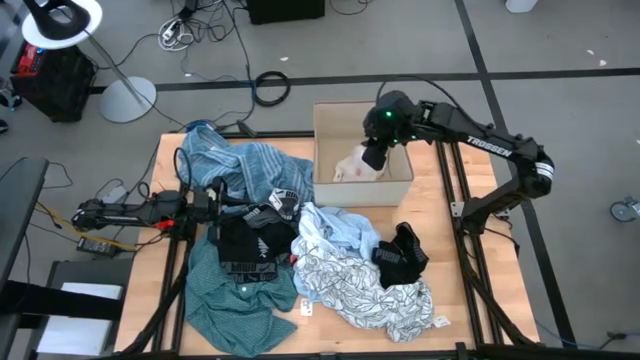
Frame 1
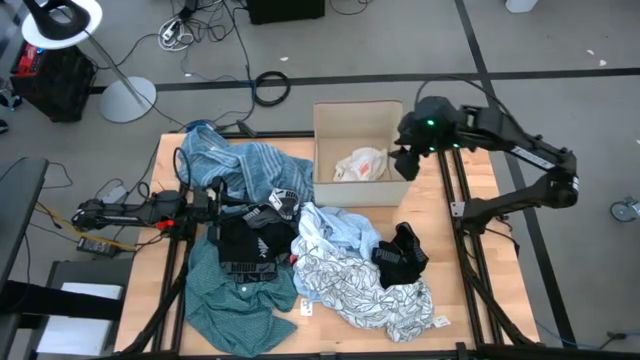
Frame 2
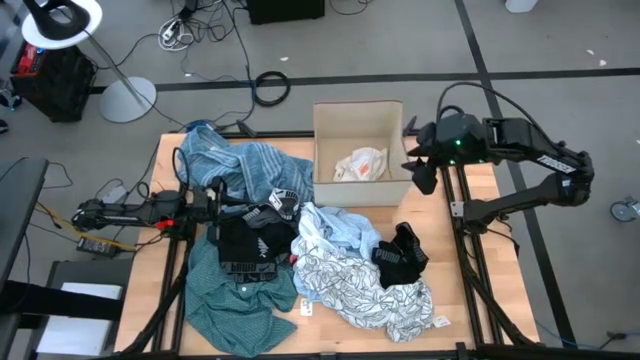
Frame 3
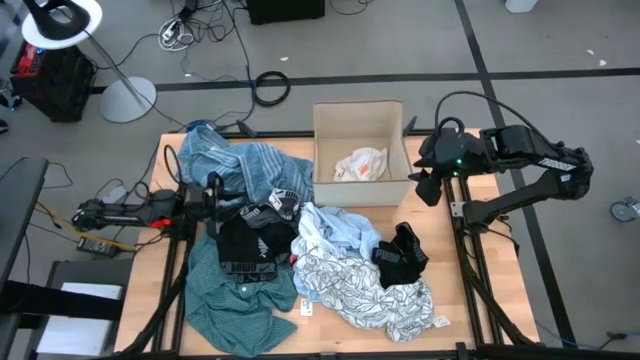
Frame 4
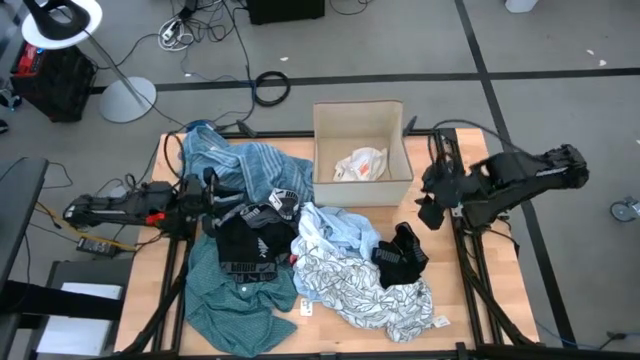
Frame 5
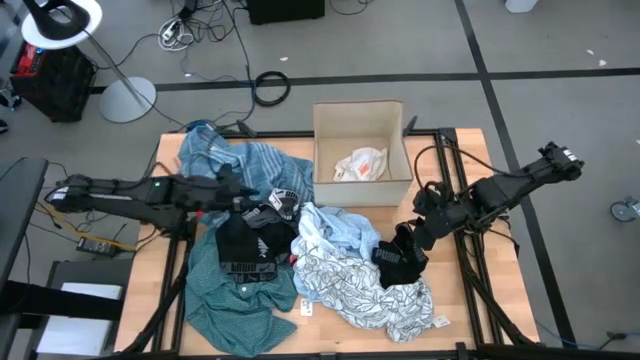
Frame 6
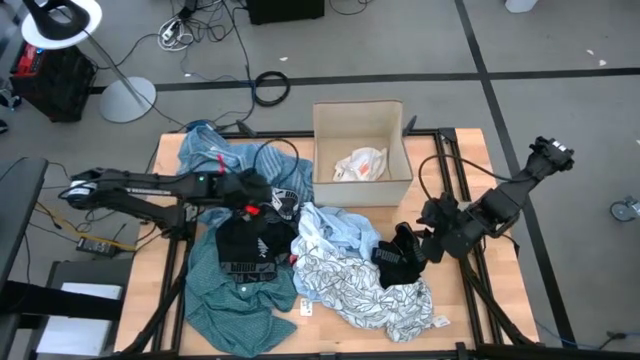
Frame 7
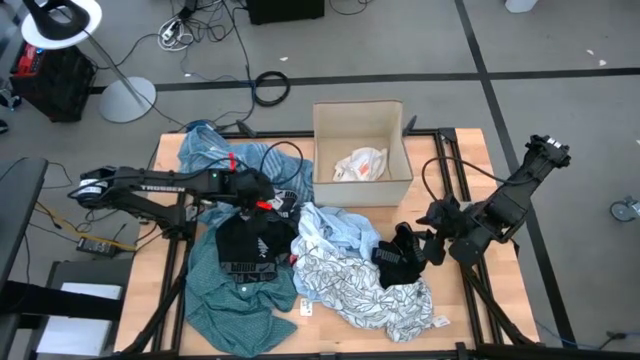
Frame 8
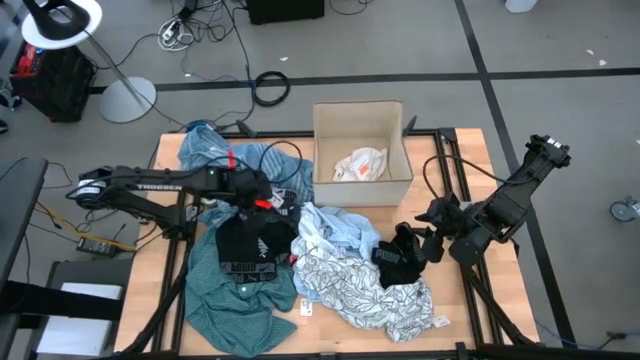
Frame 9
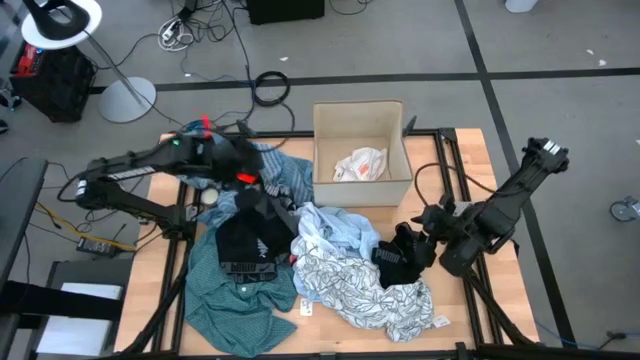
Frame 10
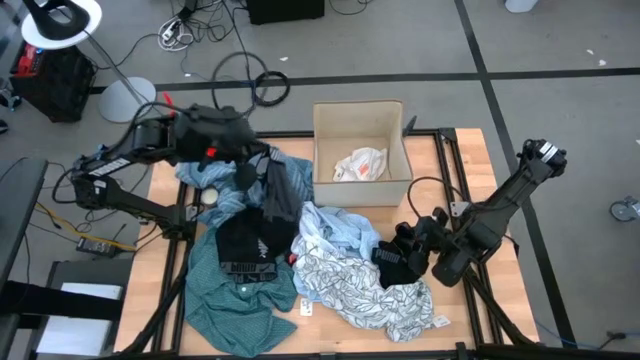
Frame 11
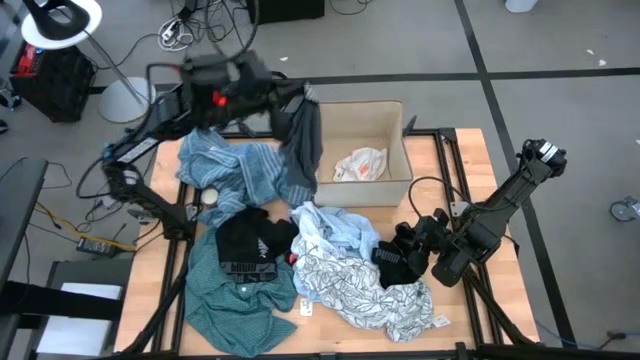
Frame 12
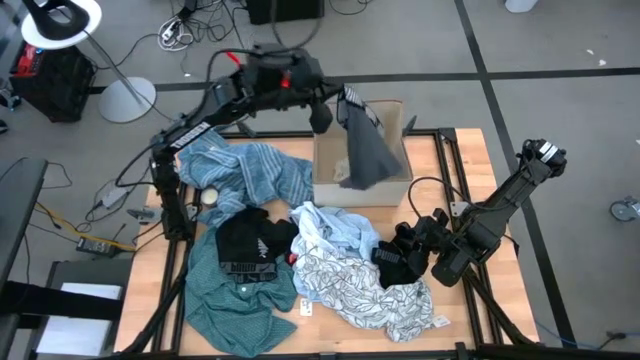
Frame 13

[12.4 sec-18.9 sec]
Task: Sort clothes
Put the gray boxer shorts into the gray laundry bin

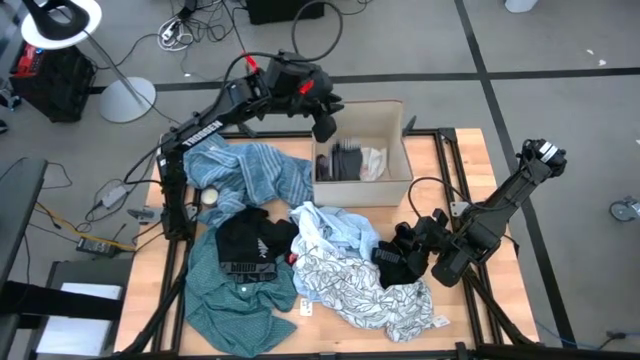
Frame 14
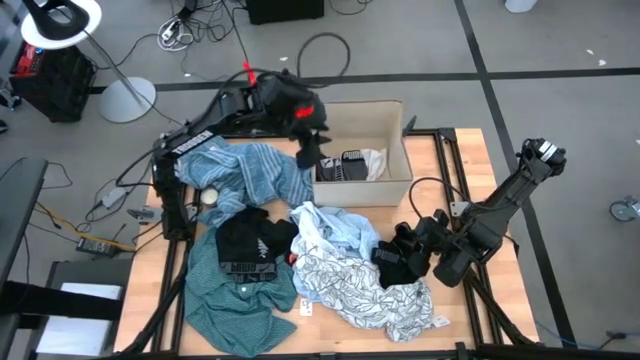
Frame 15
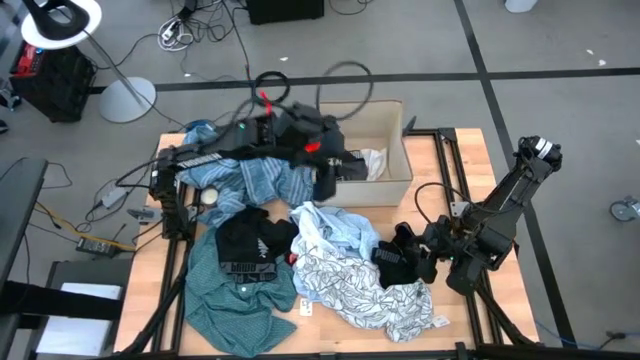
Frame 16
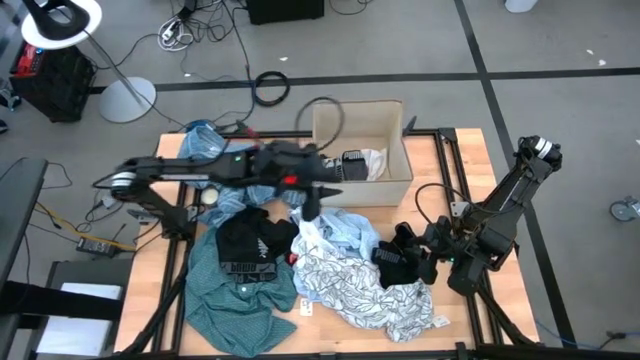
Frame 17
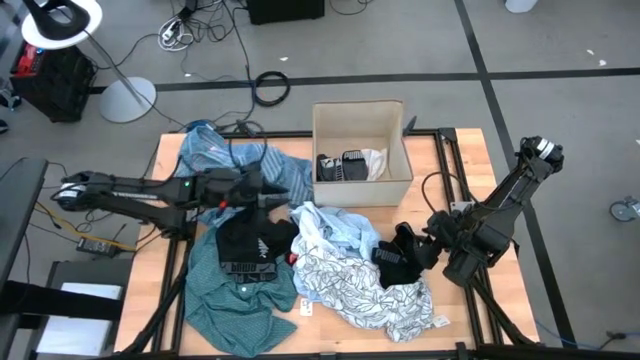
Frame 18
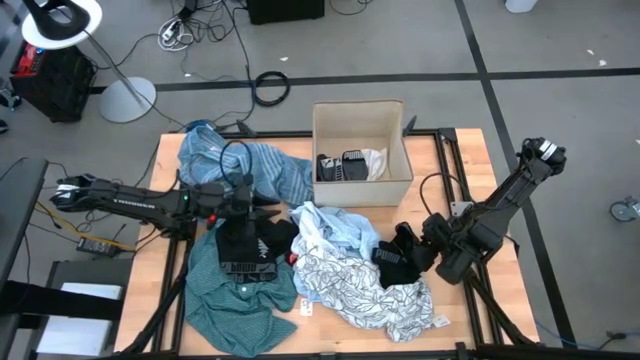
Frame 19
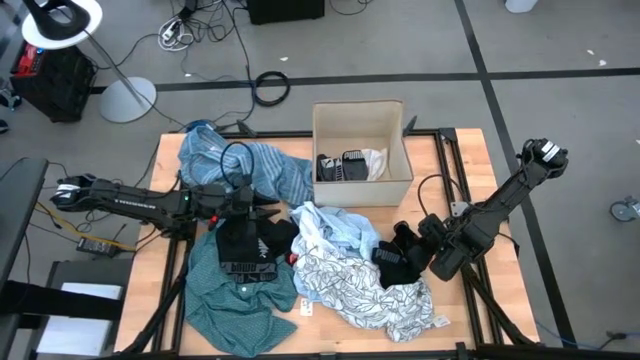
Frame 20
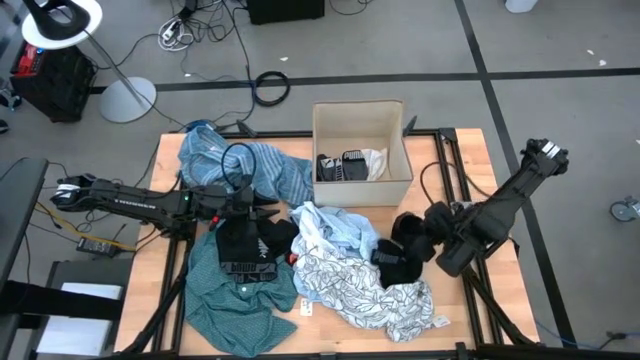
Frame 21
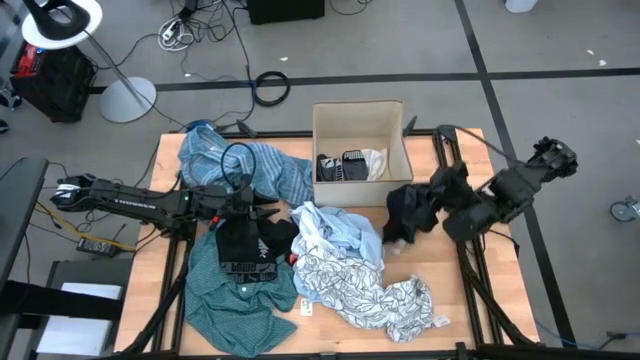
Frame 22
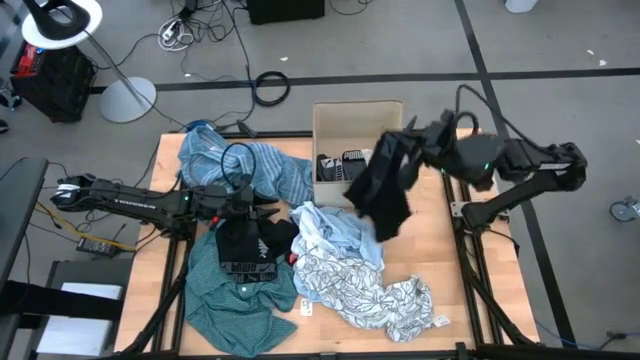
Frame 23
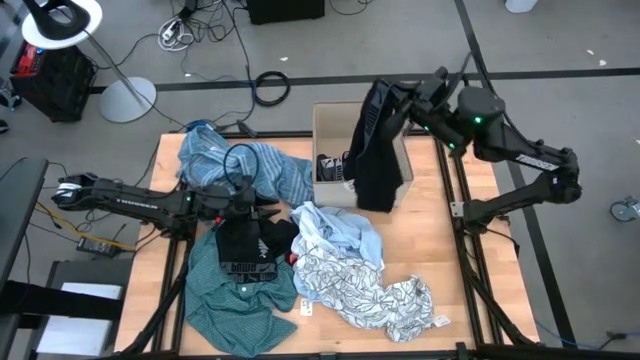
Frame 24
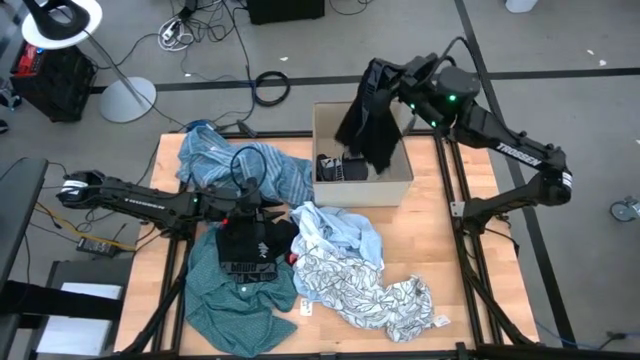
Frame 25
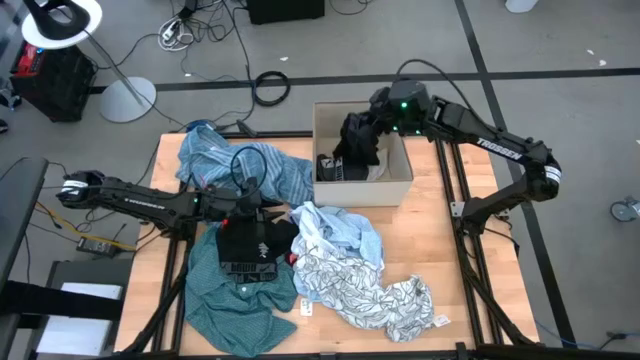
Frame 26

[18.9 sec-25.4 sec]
Put the right black boxer shorts into the gray laundry bin

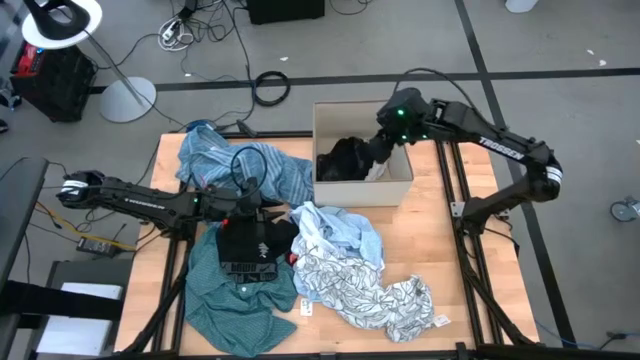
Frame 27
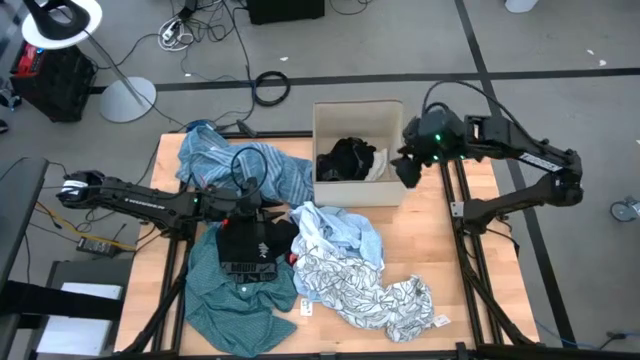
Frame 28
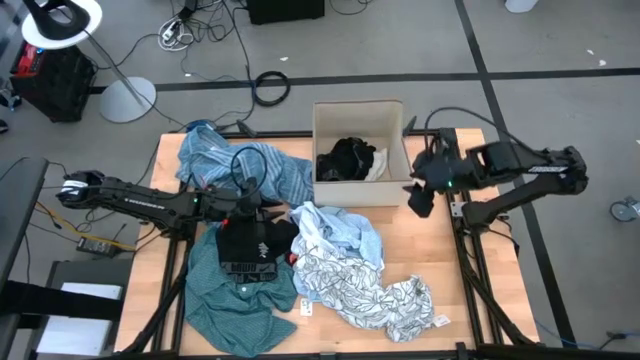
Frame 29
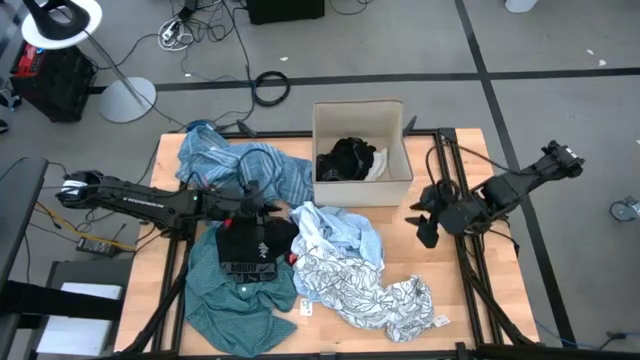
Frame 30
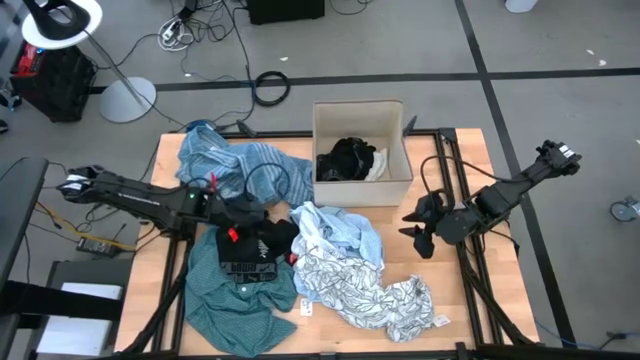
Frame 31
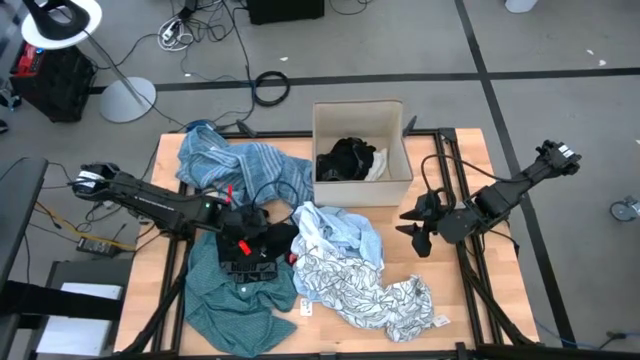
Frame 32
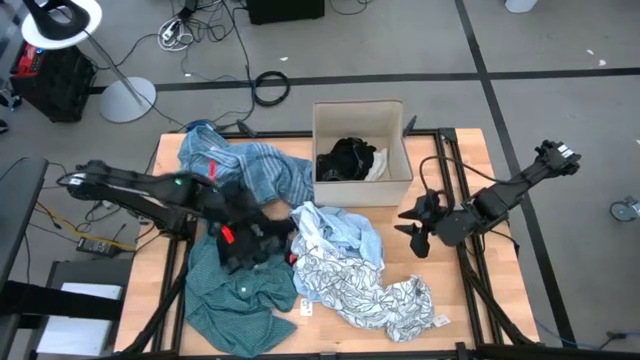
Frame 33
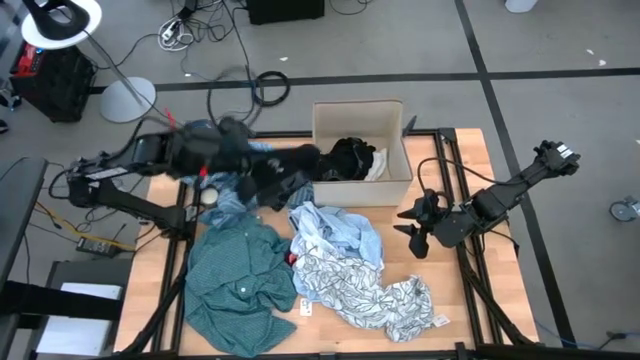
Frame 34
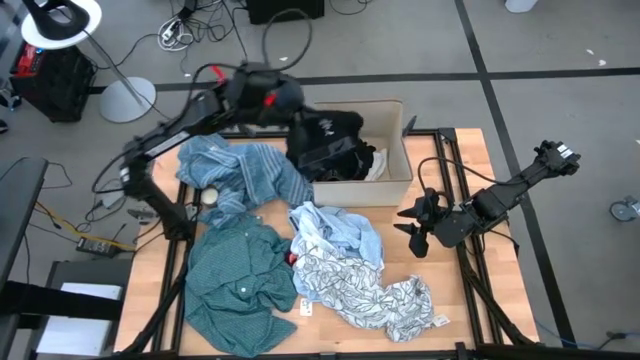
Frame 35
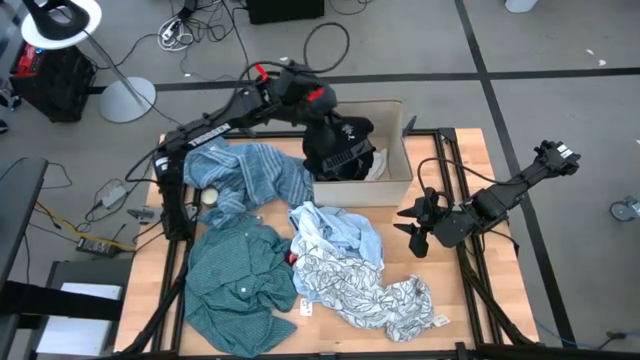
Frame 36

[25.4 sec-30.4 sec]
Put the black boxer shorts into the gray laundry bin

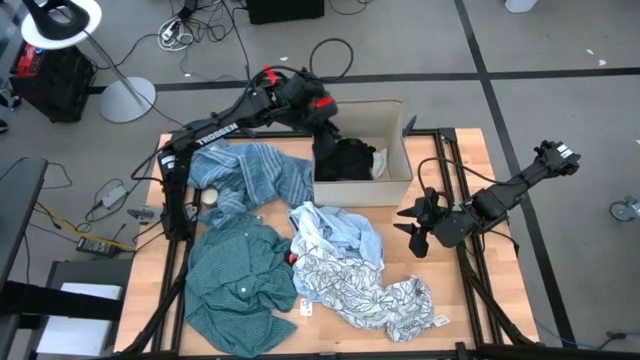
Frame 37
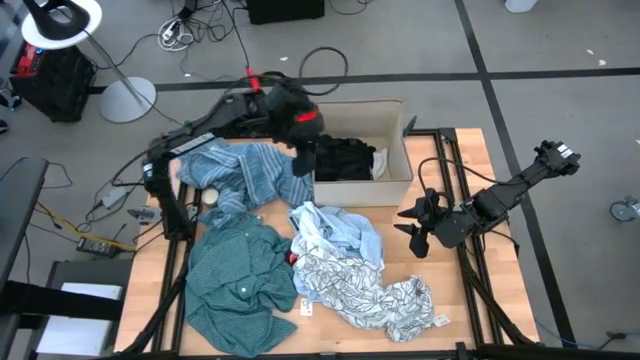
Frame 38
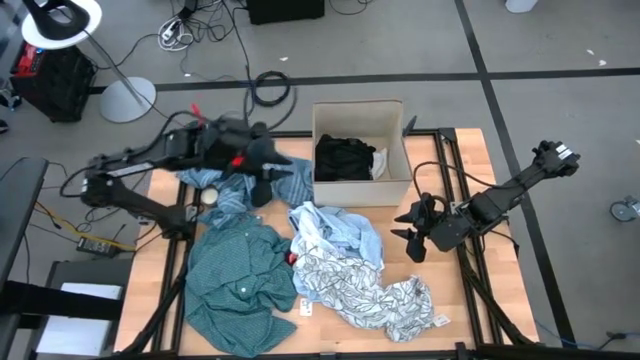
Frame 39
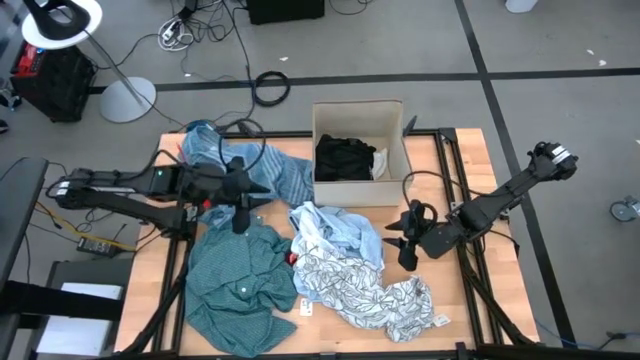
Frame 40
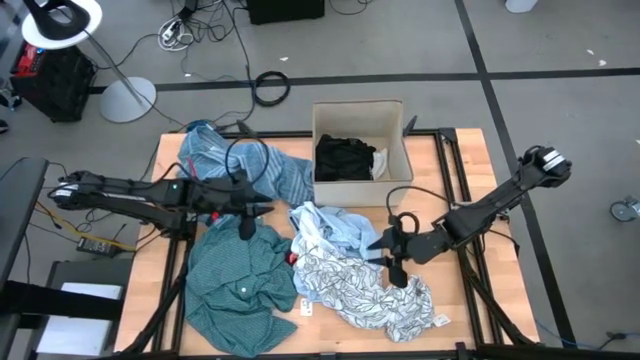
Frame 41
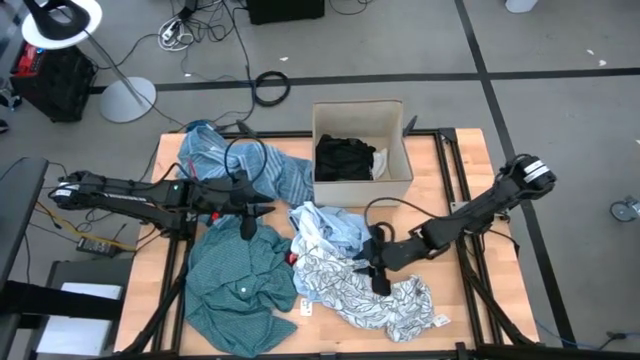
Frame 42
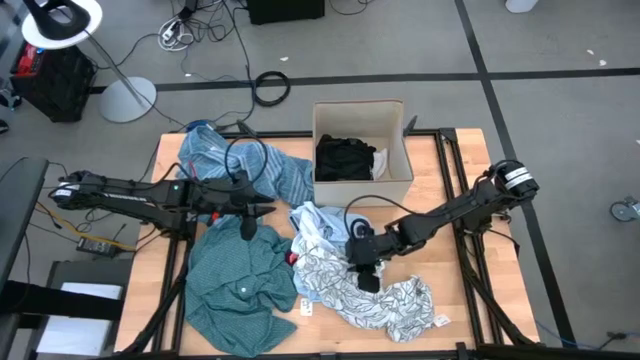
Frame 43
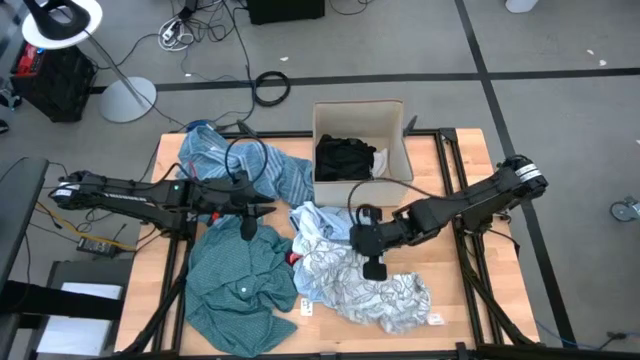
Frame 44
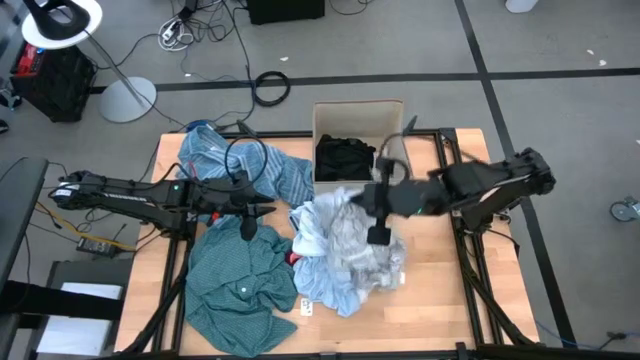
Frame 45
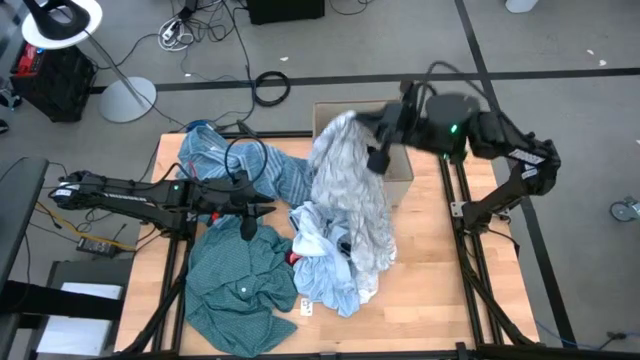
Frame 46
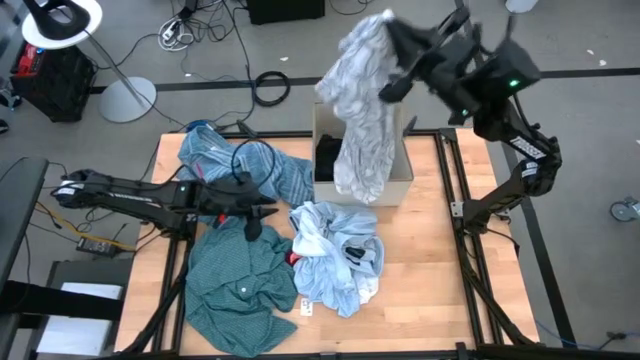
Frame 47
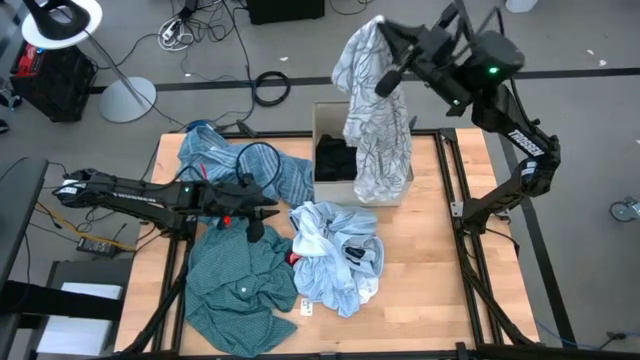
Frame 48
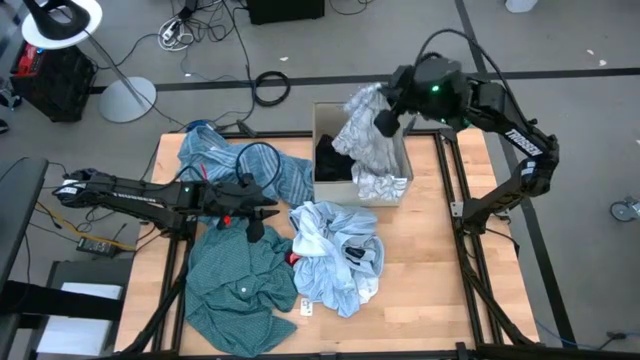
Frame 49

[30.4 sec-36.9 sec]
Put the white shirt into the gray laundry bin
